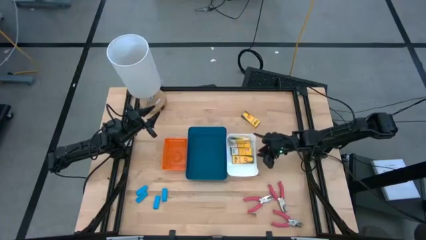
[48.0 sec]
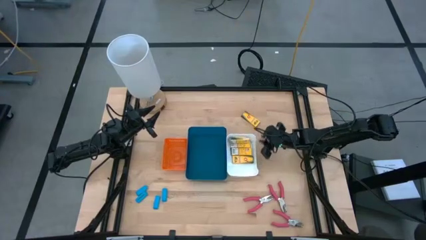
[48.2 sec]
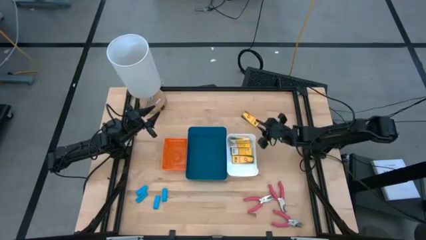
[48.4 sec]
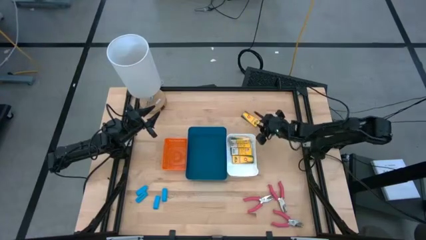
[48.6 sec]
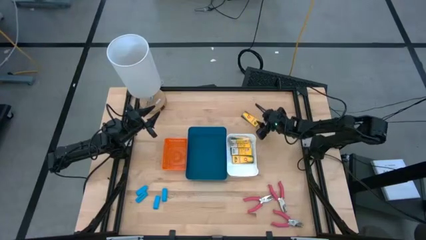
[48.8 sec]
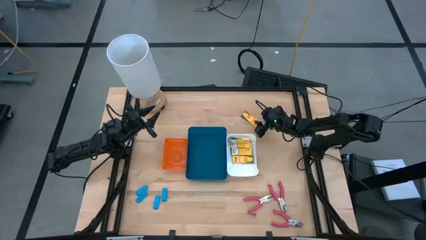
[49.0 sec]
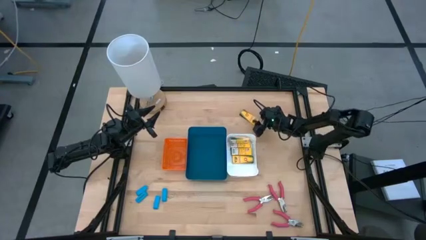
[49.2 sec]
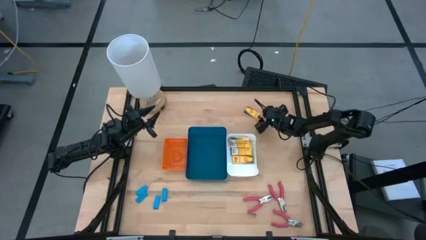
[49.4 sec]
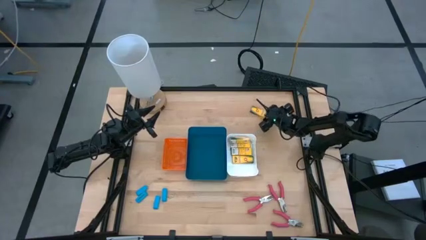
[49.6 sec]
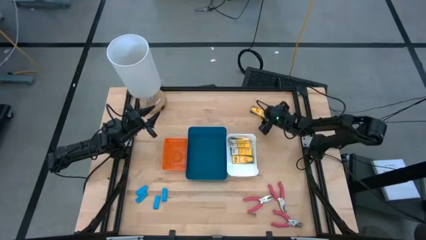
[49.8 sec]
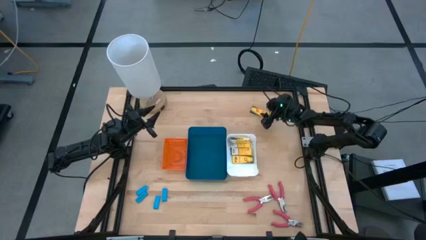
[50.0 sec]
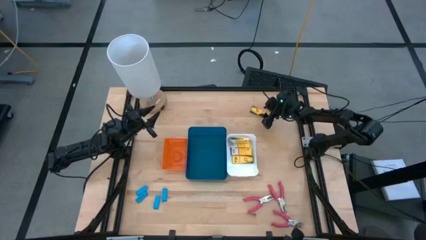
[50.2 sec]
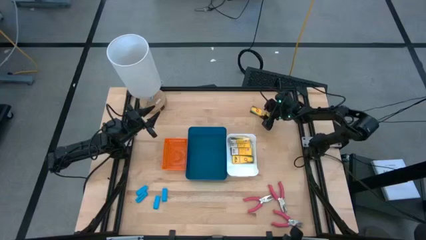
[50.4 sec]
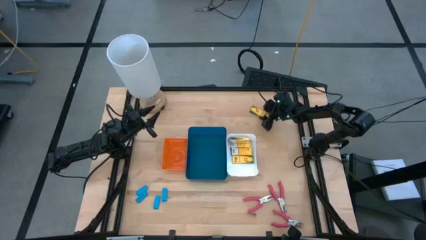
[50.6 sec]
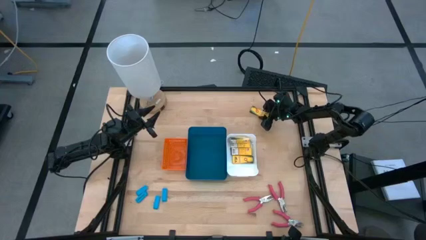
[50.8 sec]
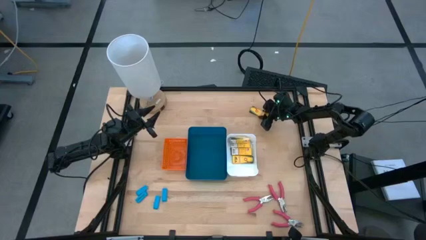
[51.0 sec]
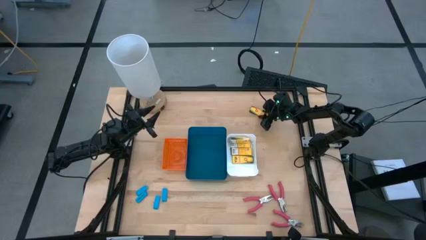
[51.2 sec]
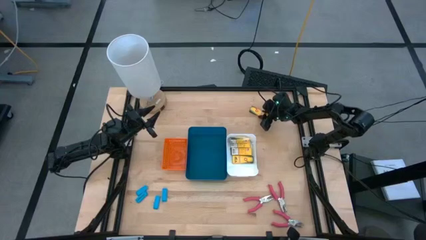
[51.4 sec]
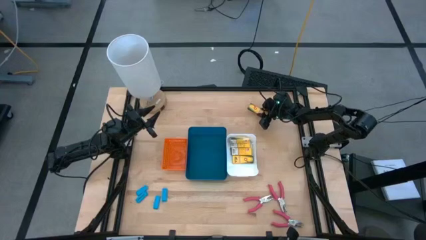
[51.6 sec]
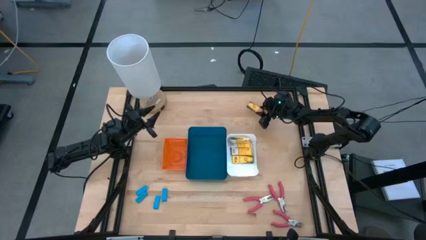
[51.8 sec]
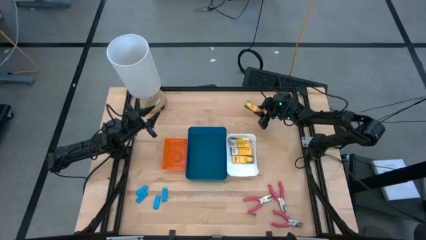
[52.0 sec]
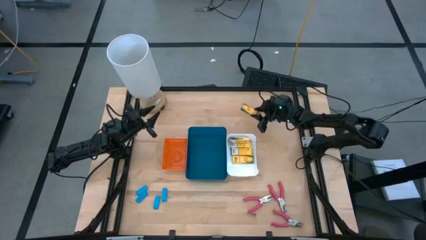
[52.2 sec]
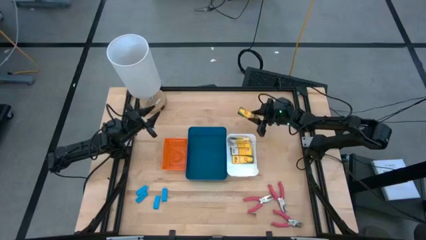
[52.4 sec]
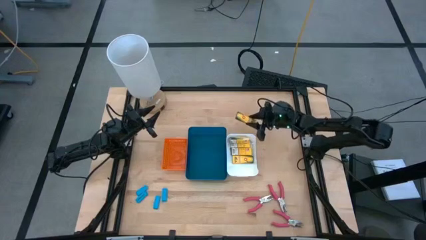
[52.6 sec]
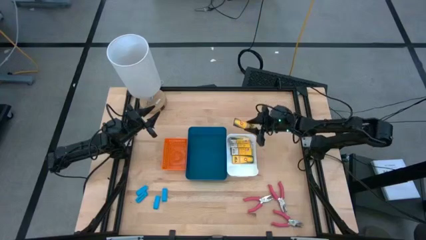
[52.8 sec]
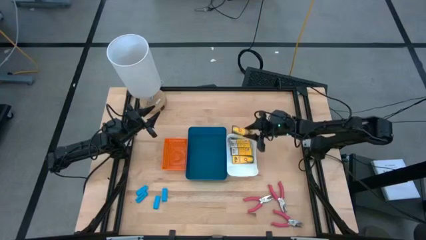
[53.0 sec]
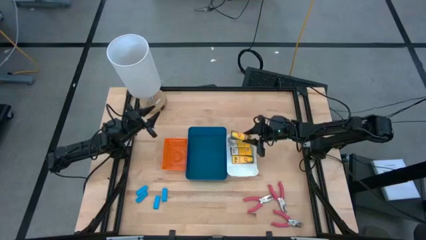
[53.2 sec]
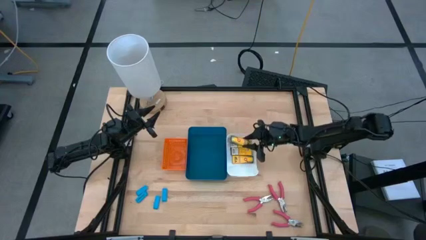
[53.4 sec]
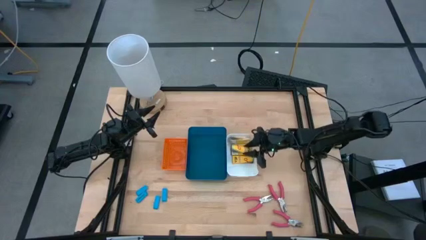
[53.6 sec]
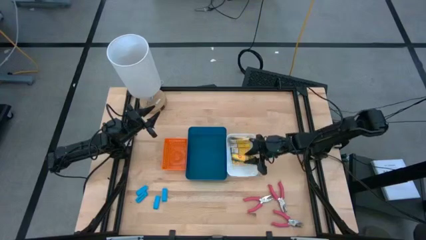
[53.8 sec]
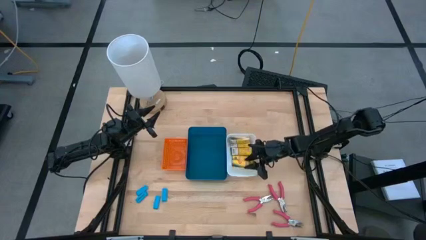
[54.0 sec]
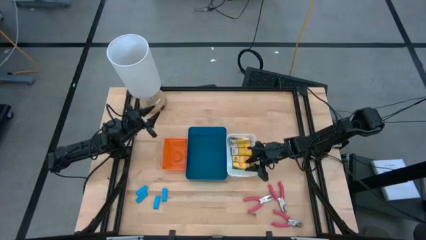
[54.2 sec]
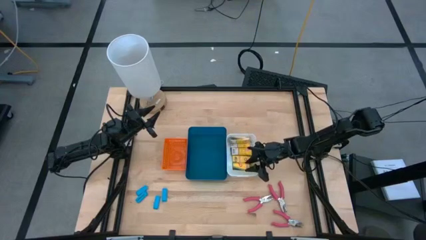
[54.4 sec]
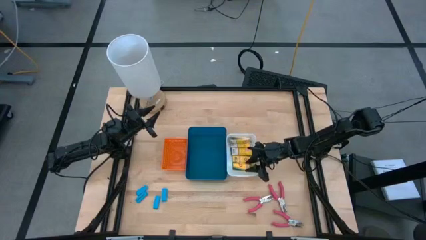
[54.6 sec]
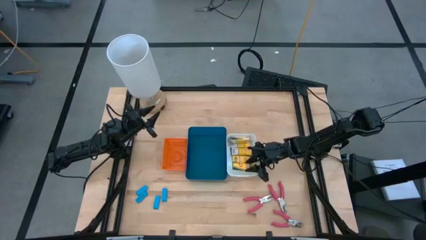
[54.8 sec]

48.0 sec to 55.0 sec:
Task: Pick & Place School Supplies
Put the yellow crayon box into the white bin

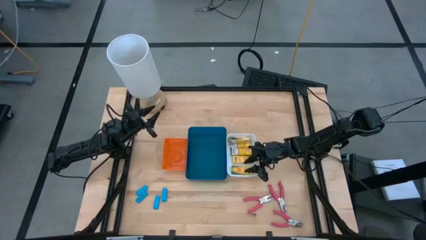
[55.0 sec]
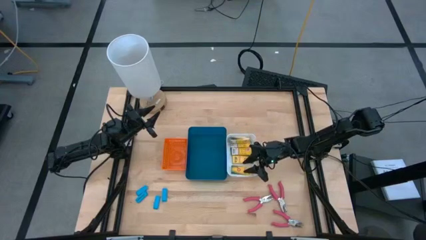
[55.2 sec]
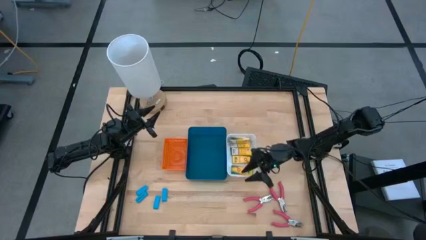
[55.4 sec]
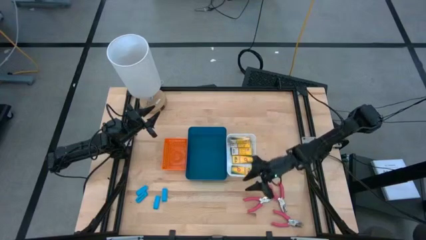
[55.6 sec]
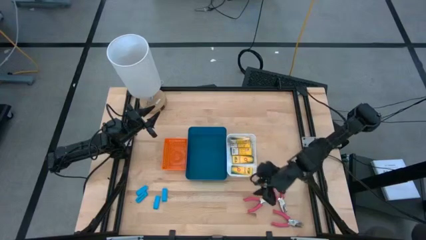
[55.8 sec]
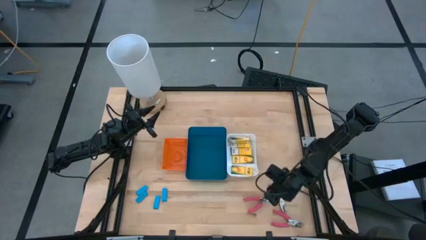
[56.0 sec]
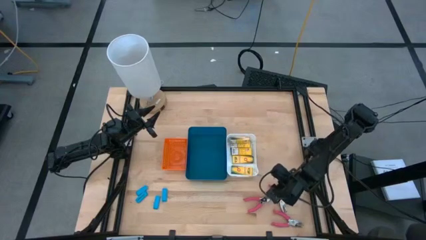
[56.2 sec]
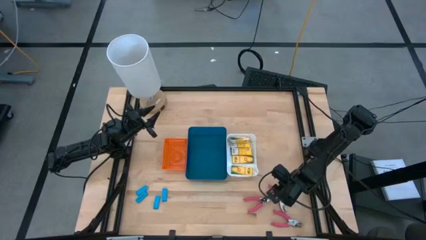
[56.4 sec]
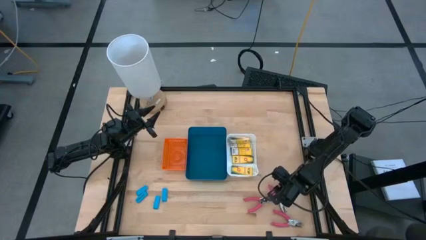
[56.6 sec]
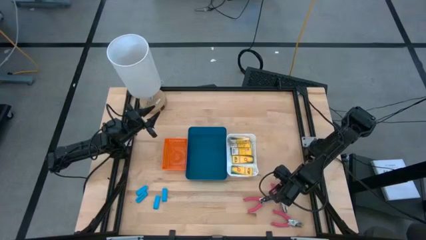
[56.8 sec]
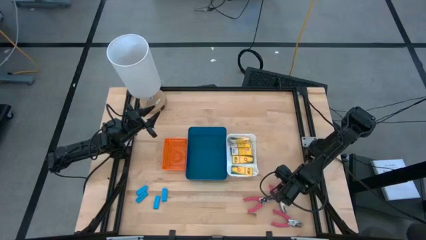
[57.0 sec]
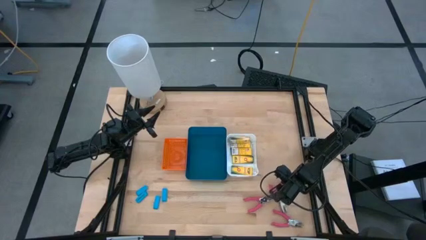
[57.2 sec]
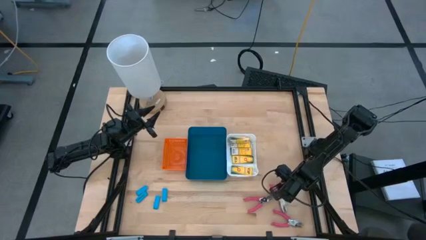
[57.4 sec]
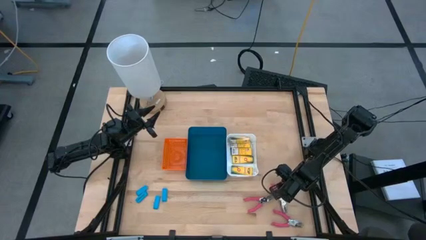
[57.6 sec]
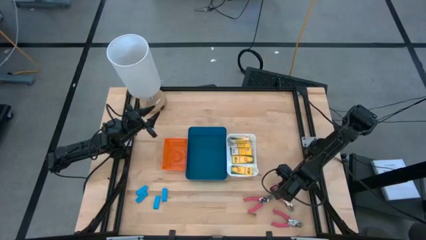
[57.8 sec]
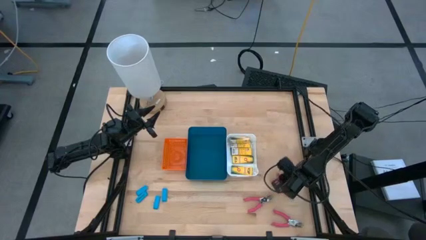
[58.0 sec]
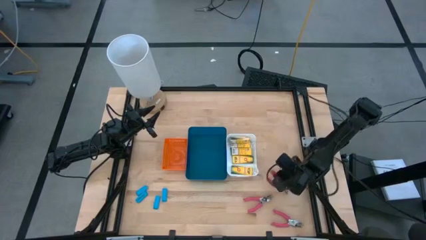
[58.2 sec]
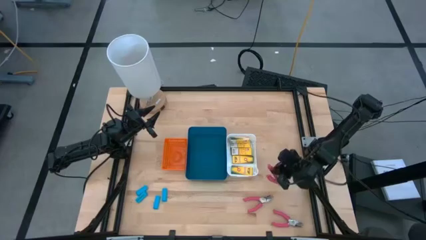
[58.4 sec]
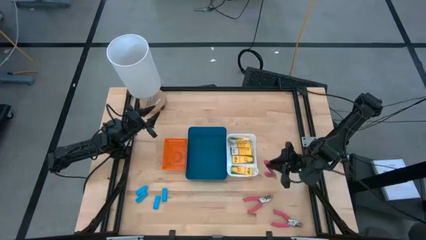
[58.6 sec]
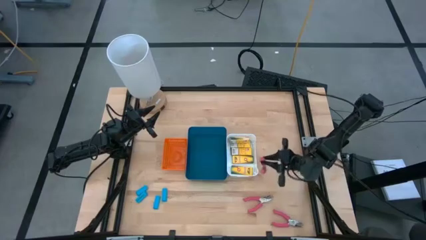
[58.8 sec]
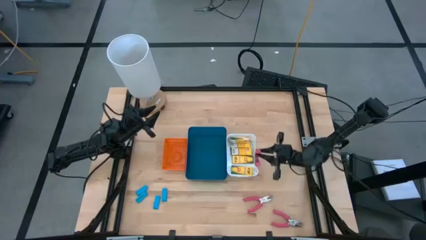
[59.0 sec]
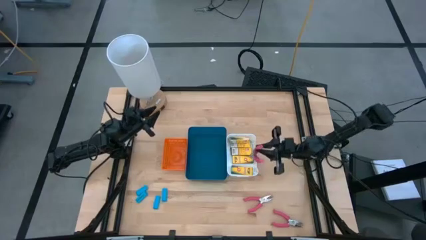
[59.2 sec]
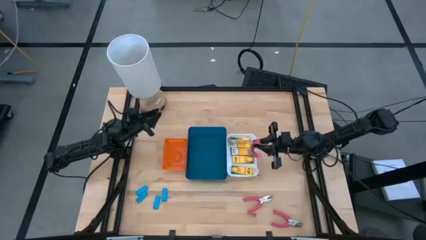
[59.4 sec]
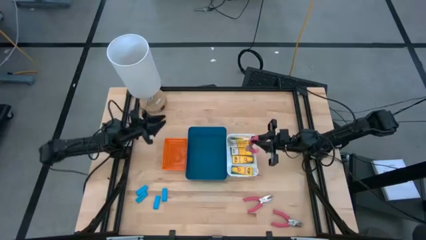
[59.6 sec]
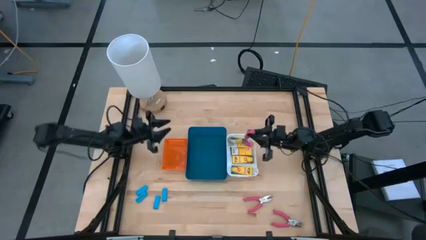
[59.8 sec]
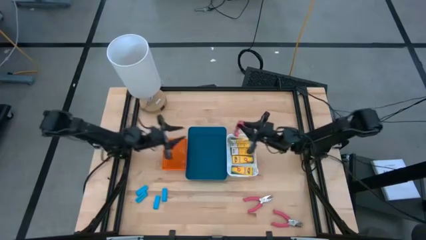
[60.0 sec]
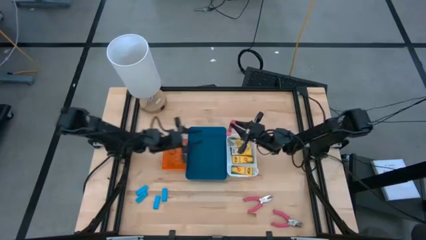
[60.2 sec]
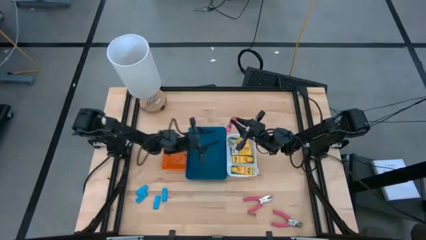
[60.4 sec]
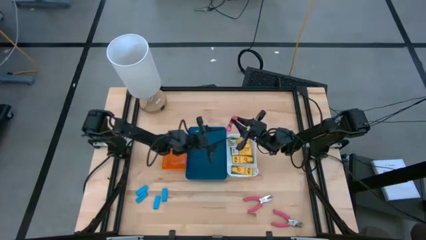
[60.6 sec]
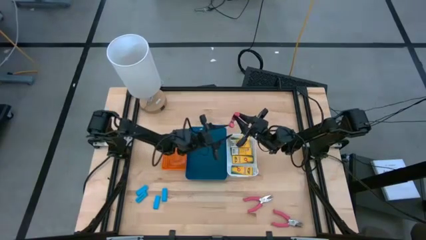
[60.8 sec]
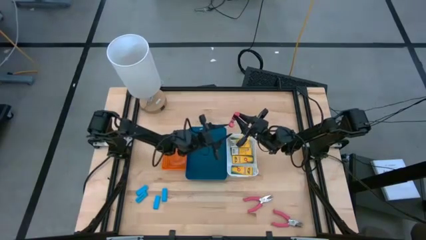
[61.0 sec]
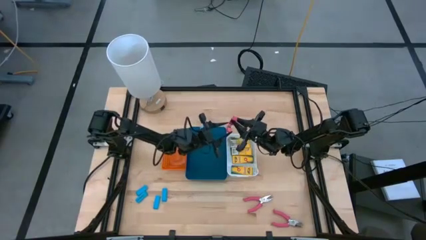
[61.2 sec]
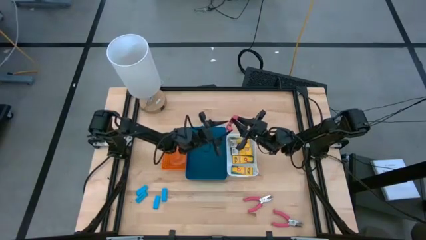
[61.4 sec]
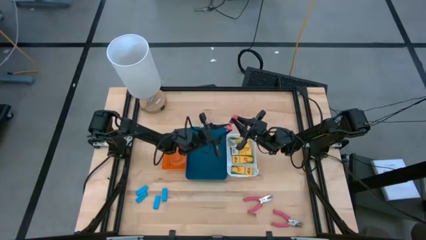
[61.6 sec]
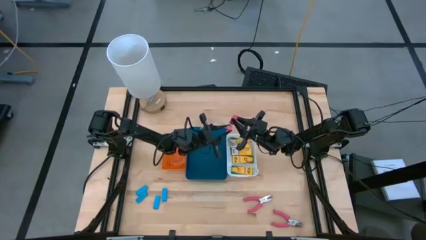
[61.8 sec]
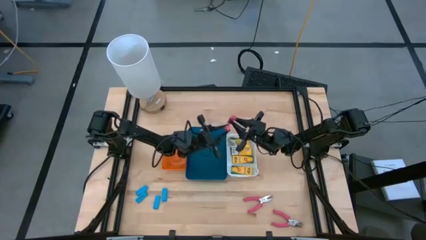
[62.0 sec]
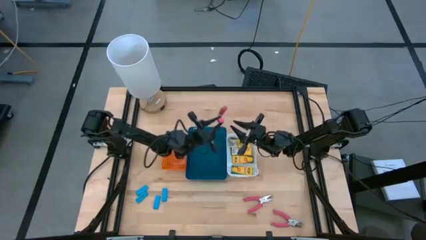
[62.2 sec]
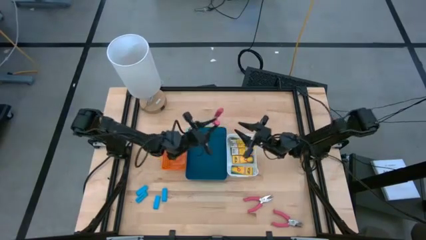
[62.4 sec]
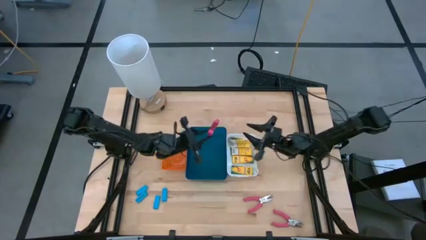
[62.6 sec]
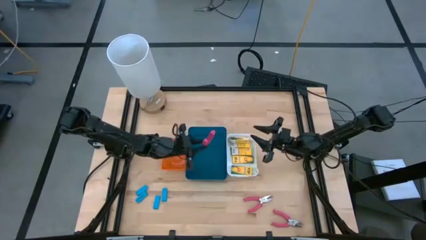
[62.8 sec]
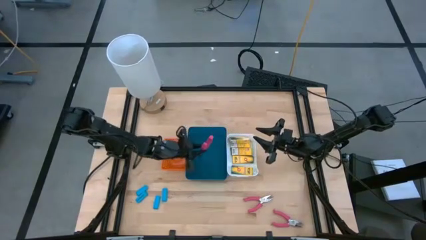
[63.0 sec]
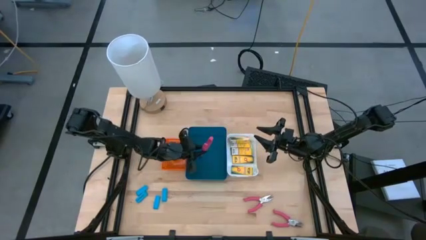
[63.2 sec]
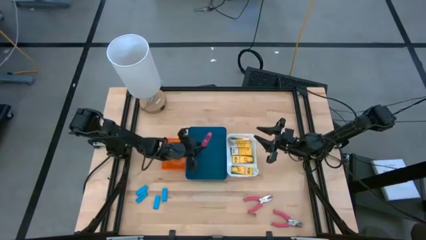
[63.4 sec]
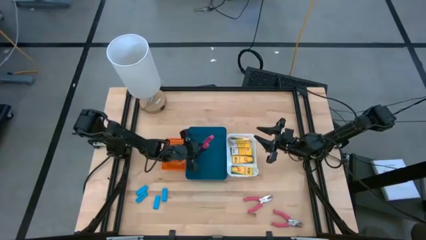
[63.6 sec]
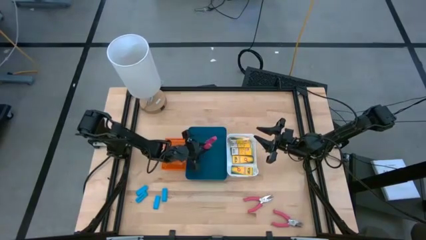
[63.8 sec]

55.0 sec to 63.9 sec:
Put the pink hole puncher into the blue bin
